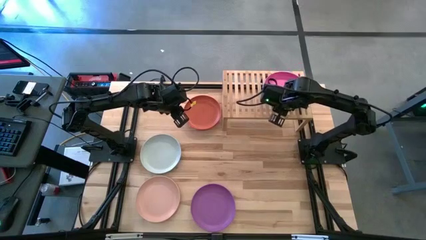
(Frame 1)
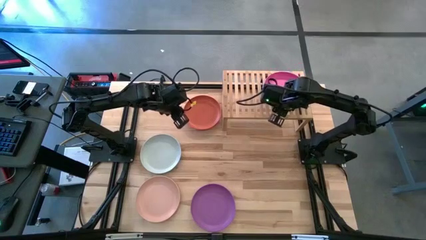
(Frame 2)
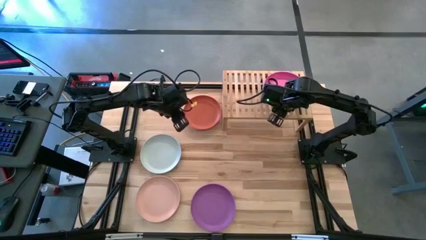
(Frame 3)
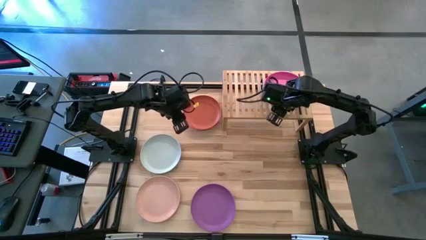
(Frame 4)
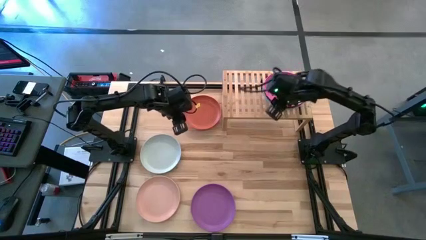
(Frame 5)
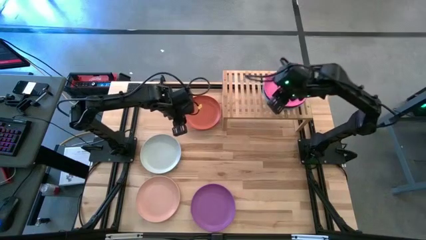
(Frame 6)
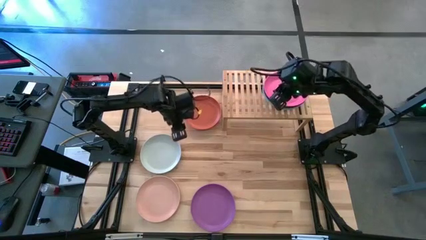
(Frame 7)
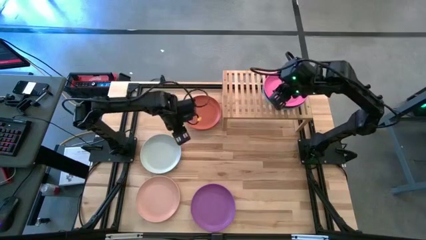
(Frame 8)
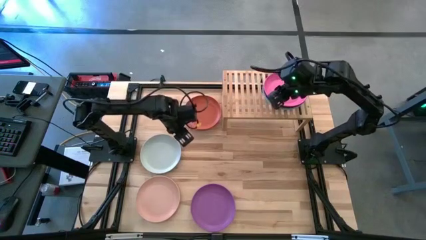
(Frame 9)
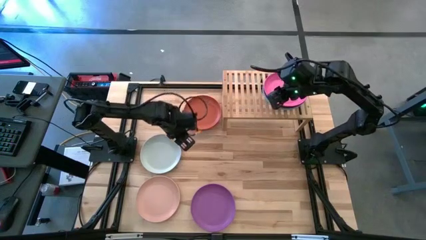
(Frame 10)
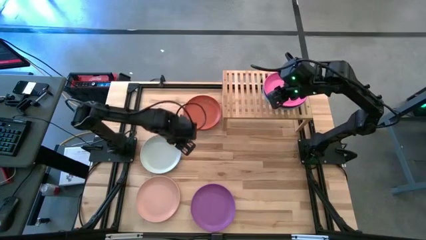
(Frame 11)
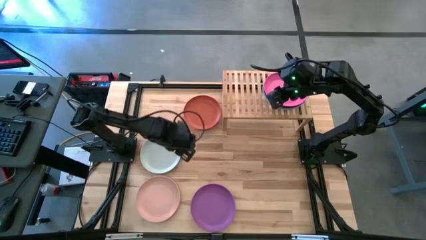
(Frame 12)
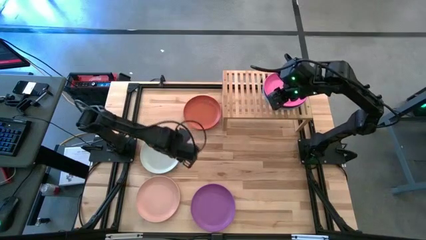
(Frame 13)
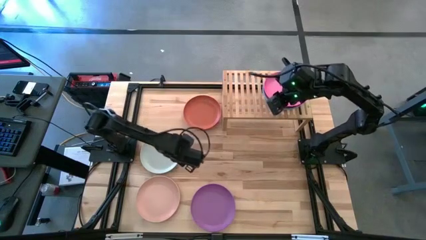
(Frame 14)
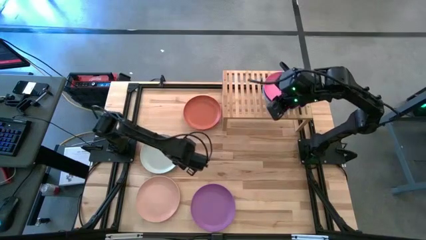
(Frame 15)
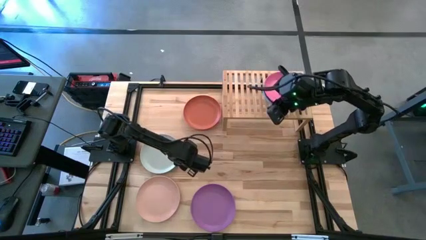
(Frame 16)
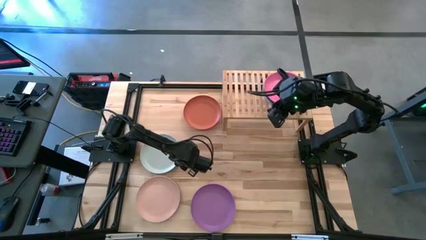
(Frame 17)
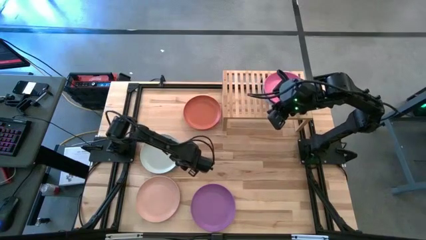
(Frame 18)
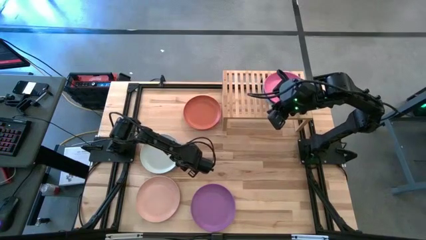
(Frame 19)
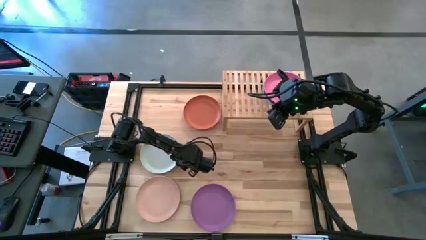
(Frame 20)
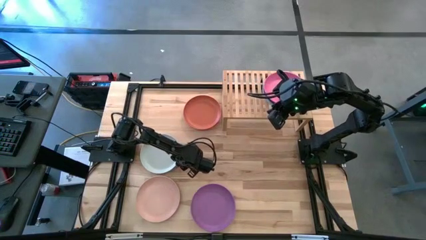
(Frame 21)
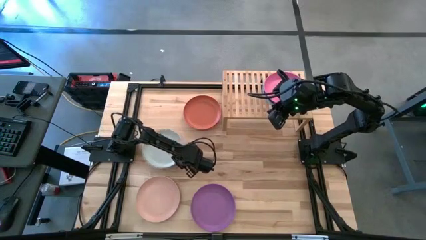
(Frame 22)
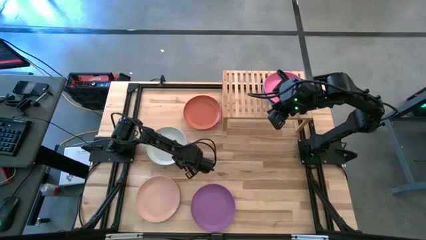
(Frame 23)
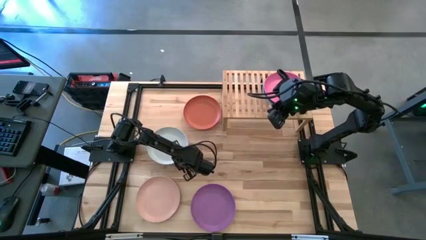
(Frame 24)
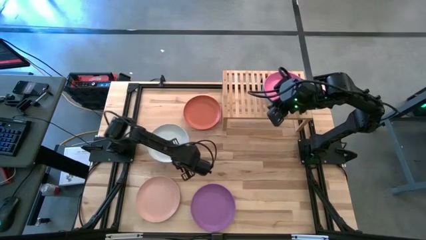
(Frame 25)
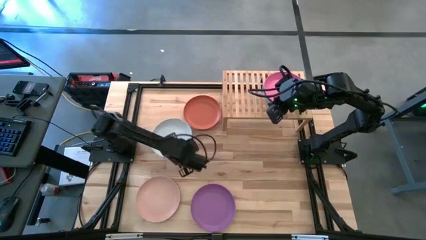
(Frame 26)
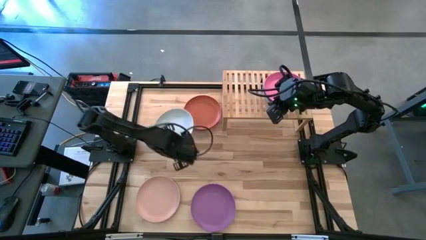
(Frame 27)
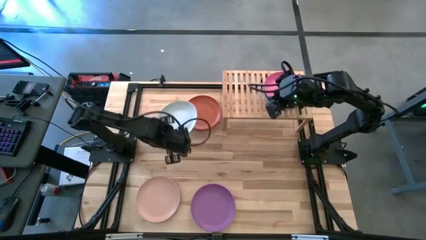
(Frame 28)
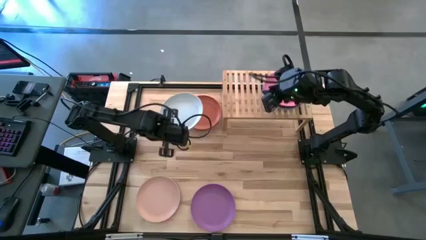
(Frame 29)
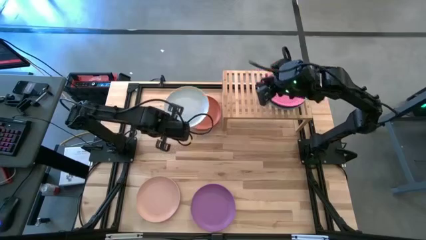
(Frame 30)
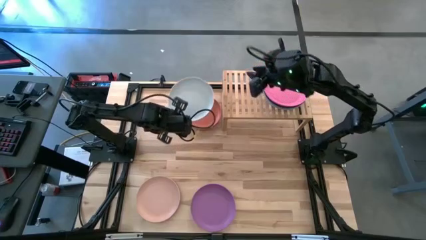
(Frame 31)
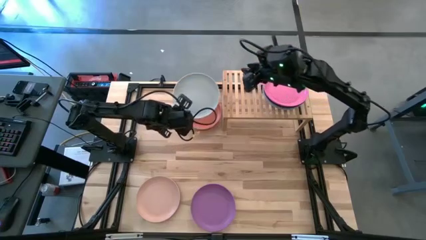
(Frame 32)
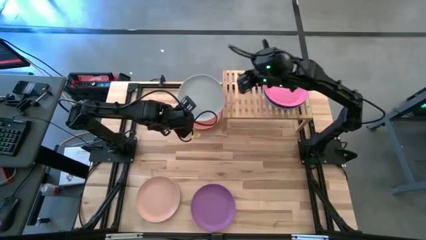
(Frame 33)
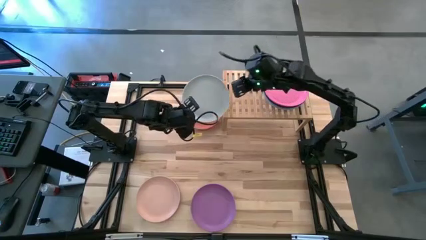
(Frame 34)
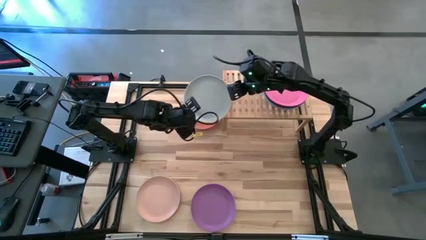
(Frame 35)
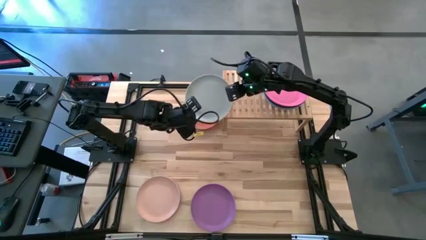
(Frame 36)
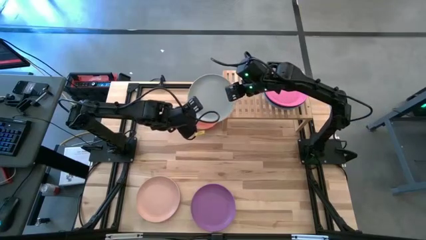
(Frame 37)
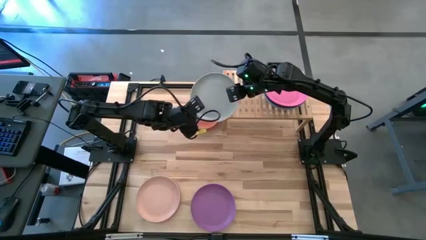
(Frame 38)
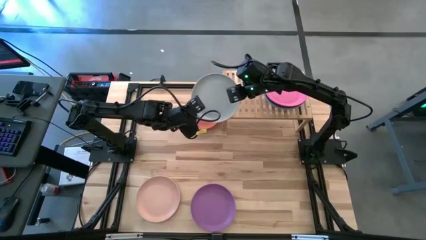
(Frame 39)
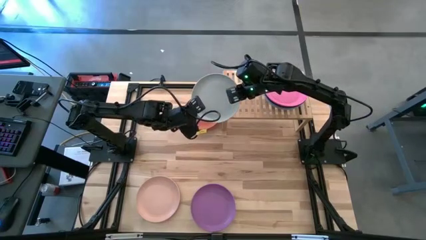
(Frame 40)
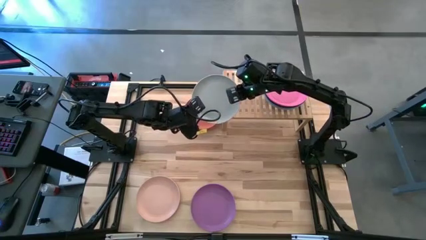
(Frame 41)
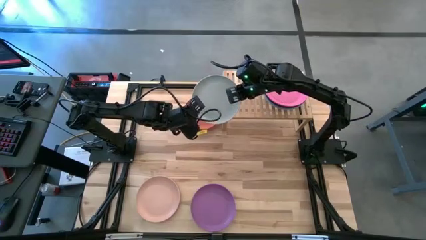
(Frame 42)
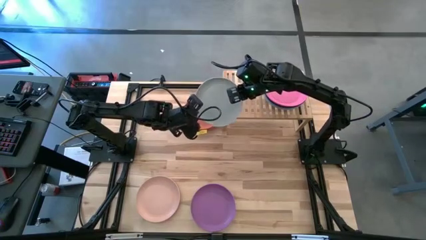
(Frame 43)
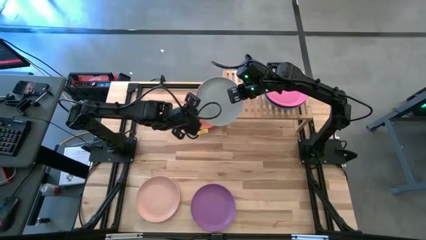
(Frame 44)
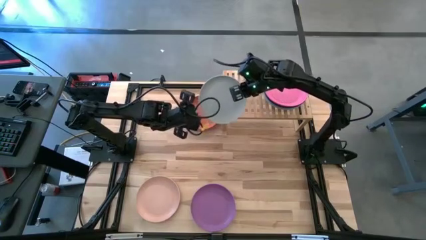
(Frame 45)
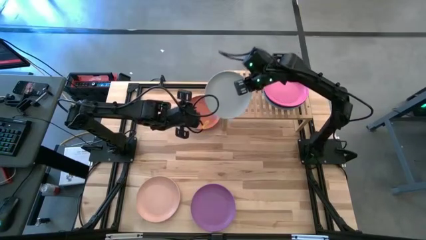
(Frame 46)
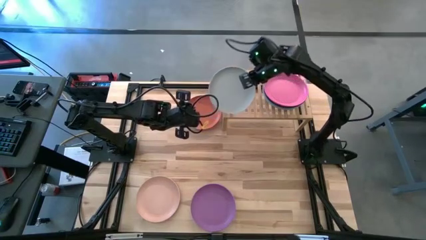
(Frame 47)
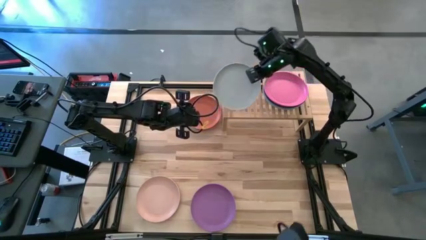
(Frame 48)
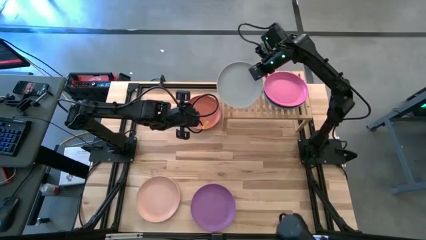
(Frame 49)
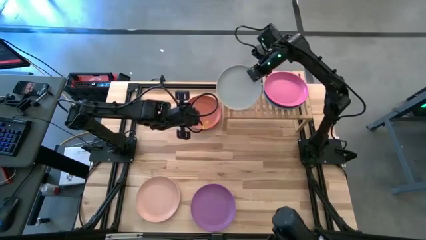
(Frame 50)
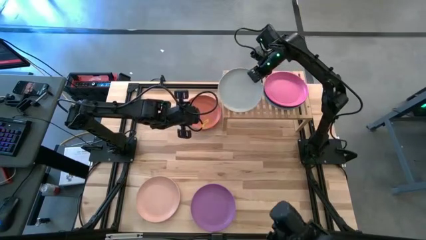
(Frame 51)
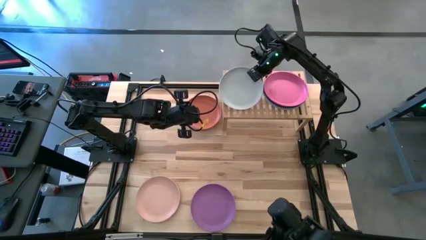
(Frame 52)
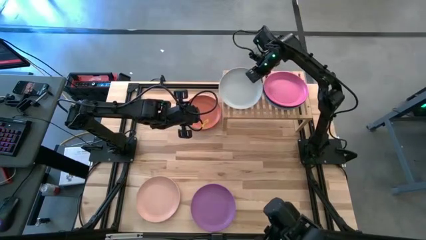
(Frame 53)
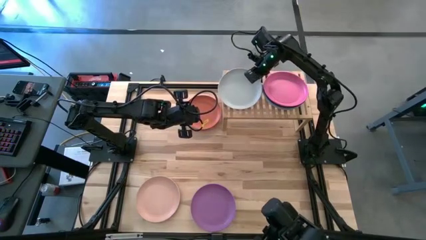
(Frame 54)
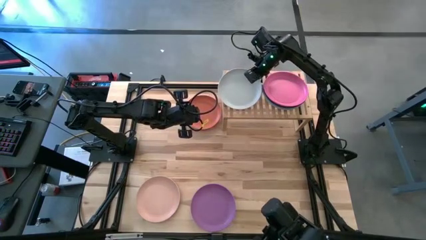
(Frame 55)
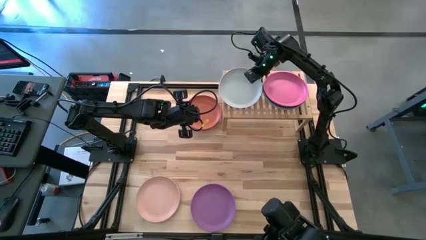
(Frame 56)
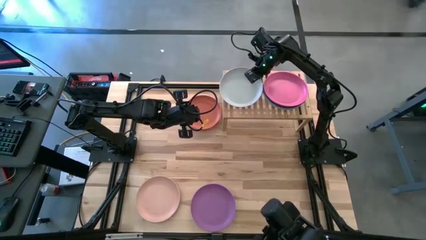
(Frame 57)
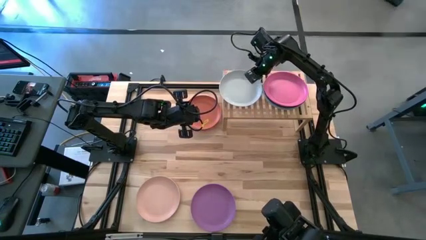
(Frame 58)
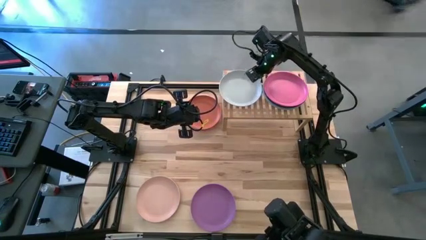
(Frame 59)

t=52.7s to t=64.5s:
Task: Place and stack plates onto a shelf
Put the white plate on the shelf

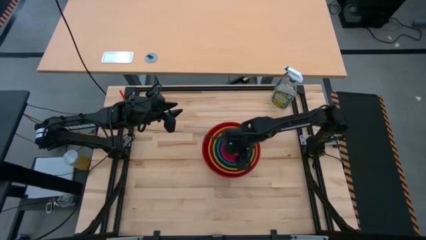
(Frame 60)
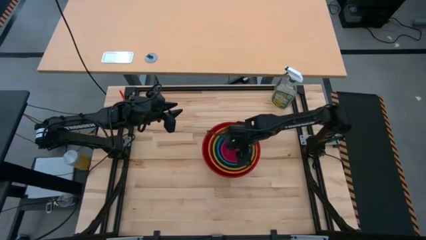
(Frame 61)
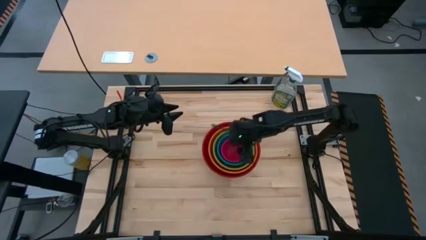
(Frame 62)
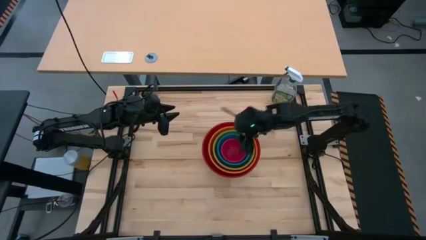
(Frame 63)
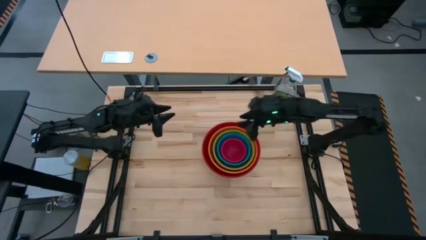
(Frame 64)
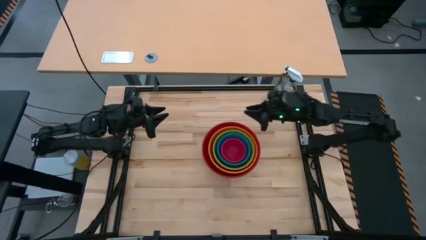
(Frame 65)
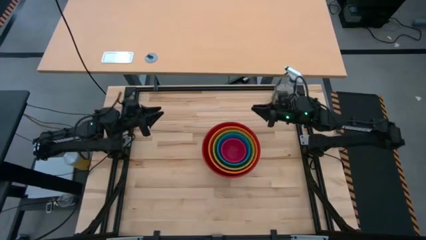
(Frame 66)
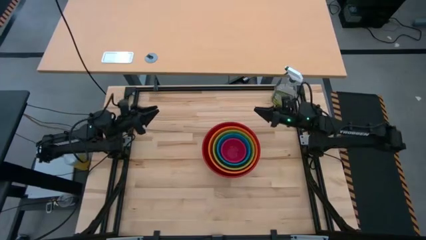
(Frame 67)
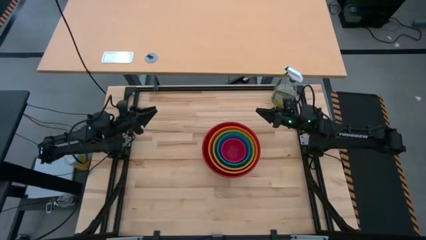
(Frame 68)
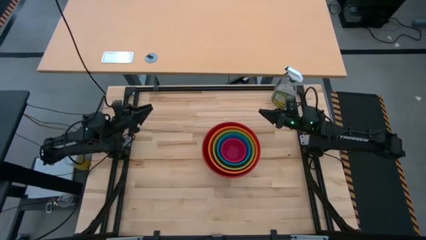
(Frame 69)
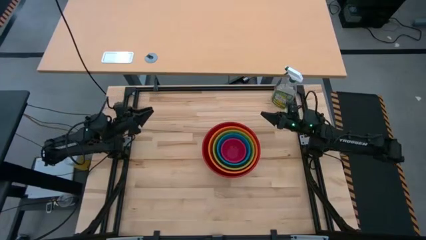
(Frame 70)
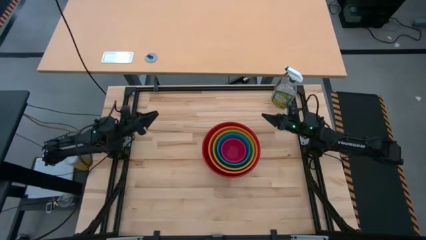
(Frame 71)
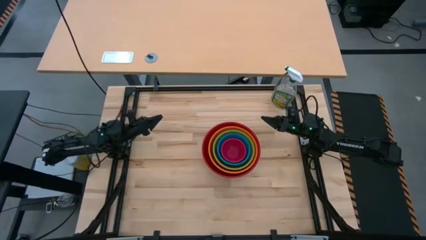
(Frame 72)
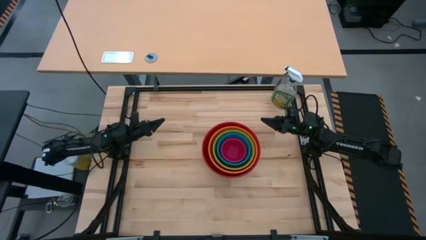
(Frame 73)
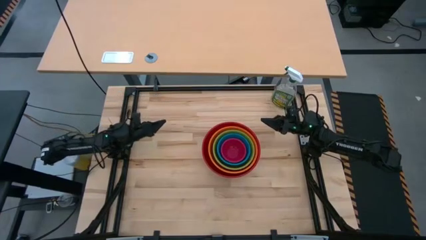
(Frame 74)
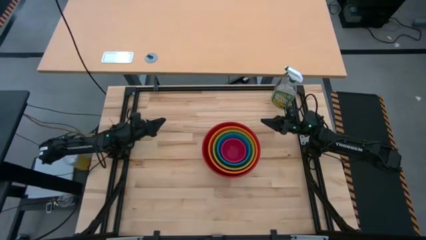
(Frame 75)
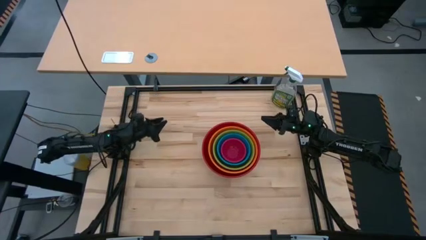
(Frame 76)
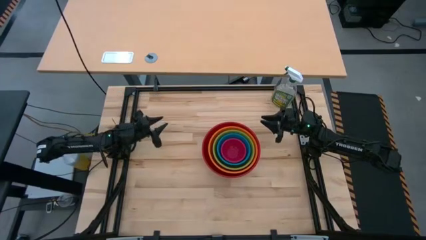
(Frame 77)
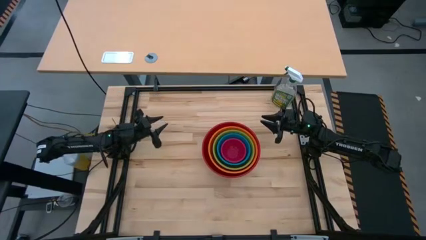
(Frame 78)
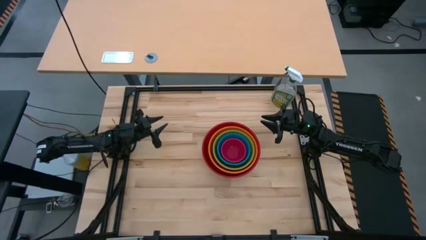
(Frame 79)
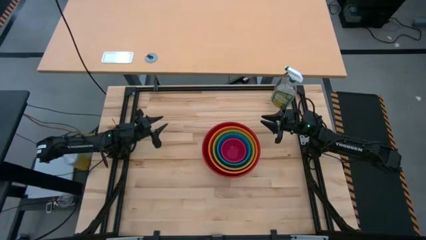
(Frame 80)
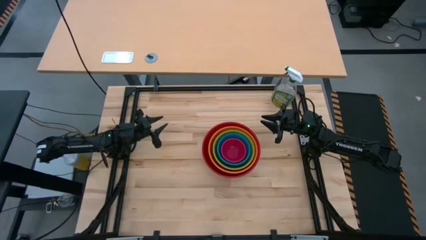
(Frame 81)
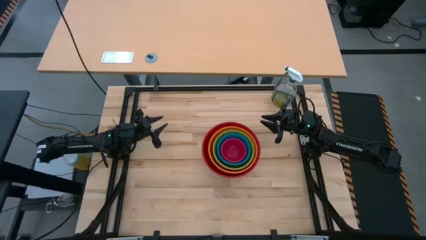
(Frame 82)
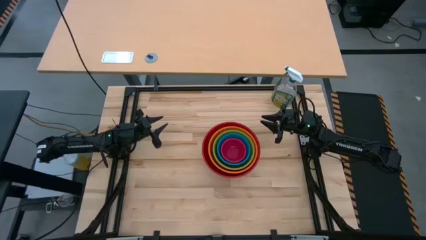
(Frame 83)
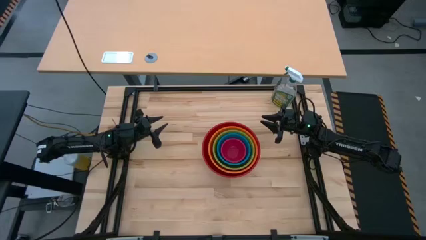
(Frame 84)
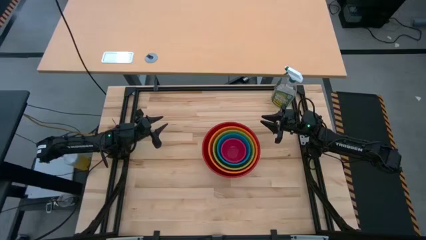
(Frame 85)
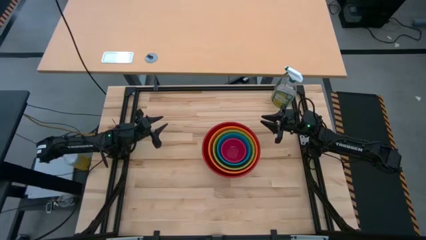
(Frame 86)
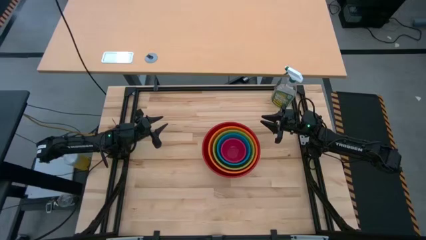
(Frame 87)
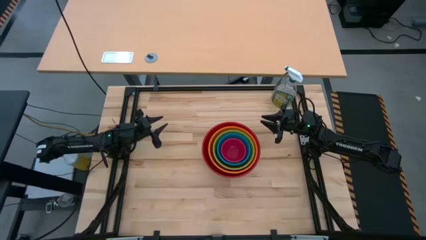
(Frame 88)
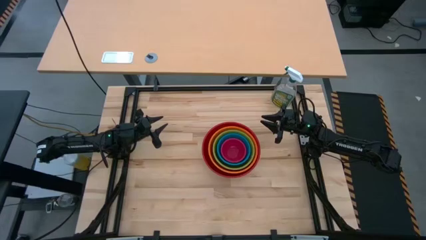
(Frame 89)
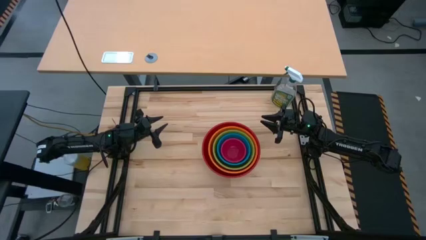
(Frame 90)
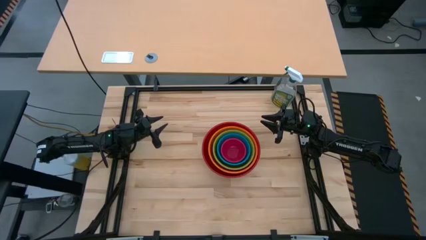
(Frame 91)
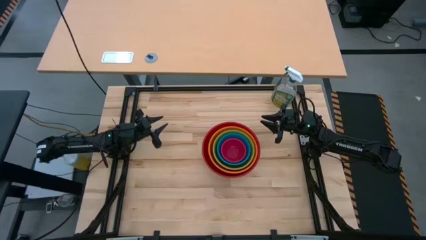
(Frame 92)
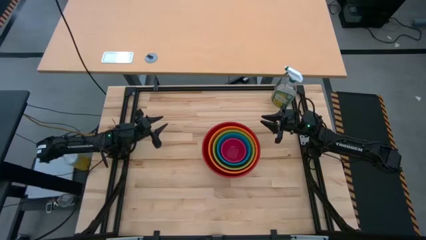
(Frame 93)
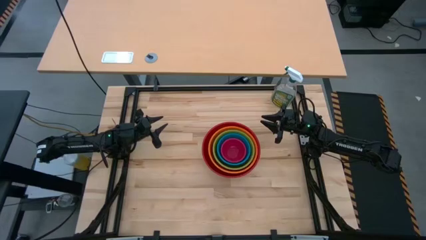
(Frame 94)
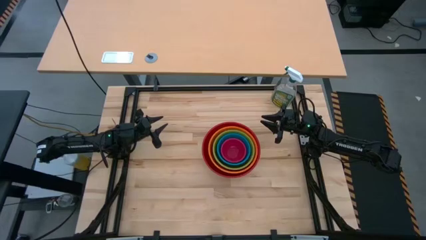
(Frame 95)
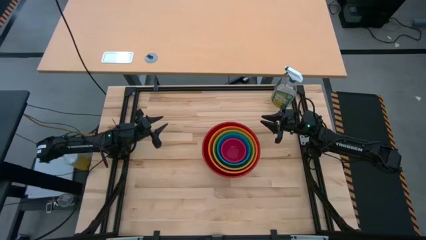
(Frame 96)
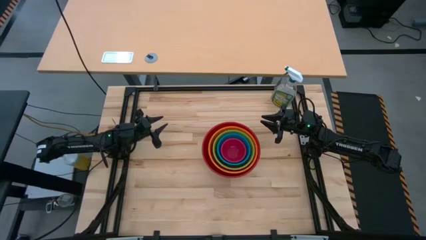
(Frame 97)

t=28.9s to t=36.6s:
Task: Nest bowls inside each other by size order
Return to Home Position
